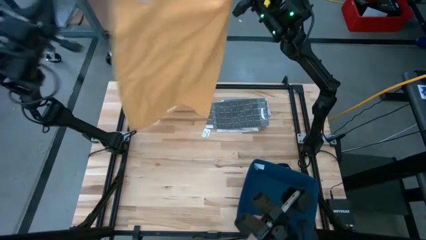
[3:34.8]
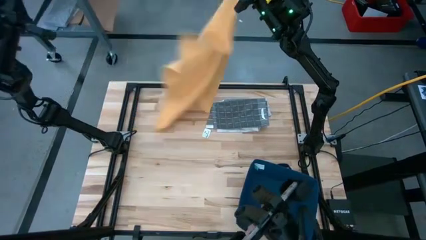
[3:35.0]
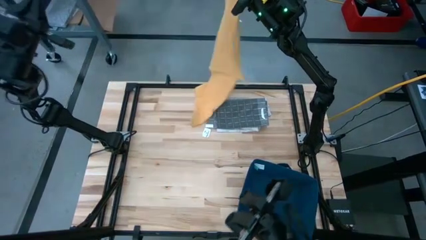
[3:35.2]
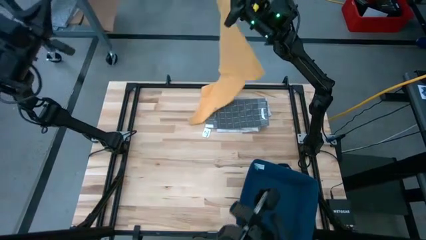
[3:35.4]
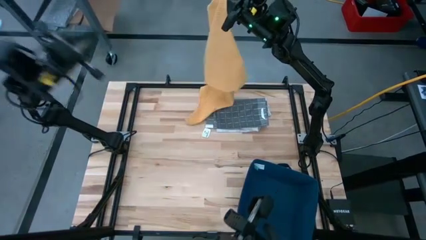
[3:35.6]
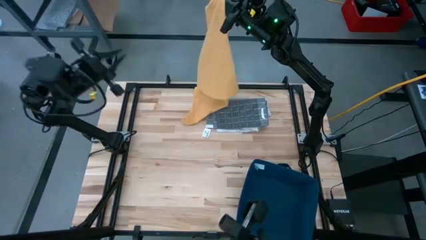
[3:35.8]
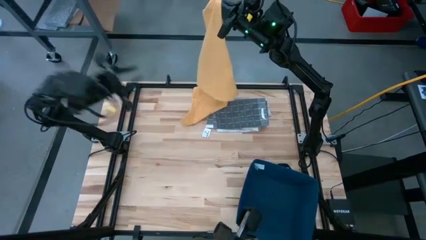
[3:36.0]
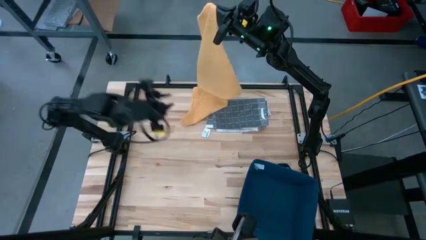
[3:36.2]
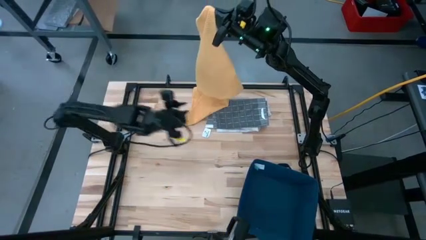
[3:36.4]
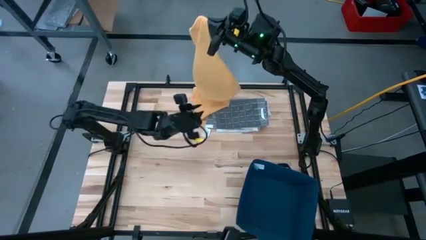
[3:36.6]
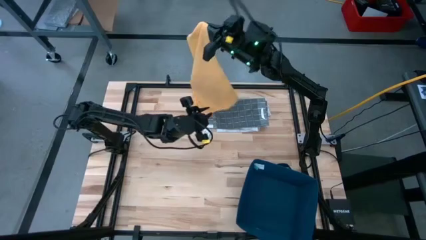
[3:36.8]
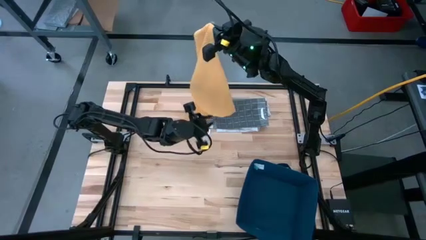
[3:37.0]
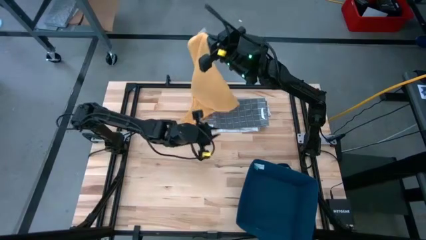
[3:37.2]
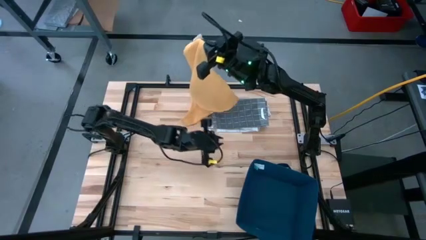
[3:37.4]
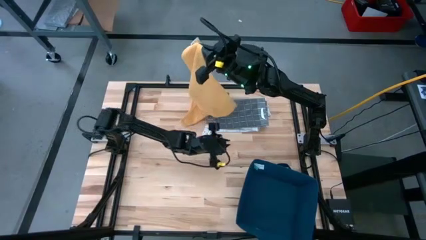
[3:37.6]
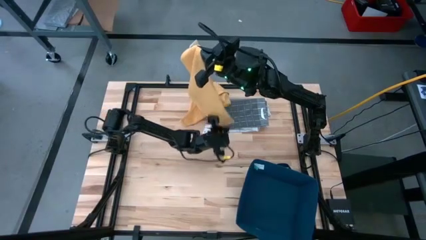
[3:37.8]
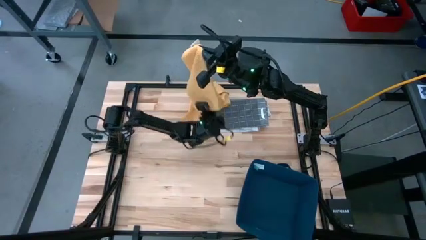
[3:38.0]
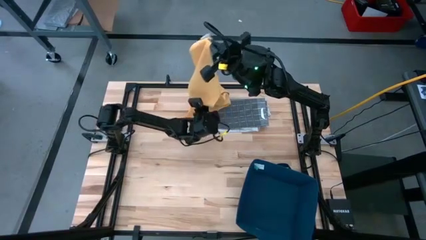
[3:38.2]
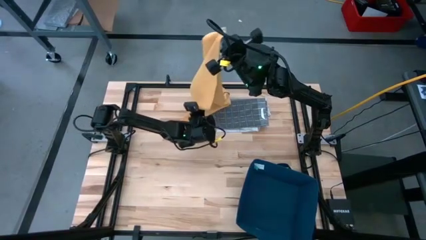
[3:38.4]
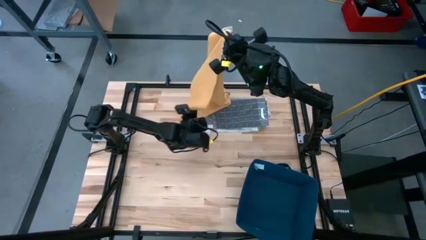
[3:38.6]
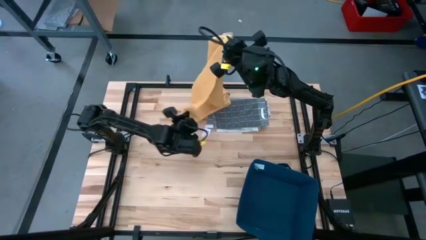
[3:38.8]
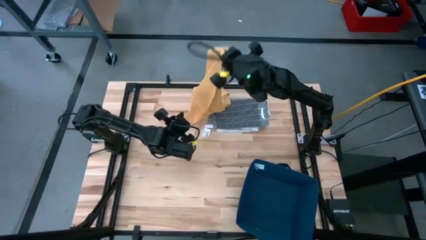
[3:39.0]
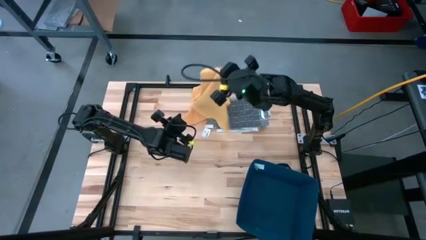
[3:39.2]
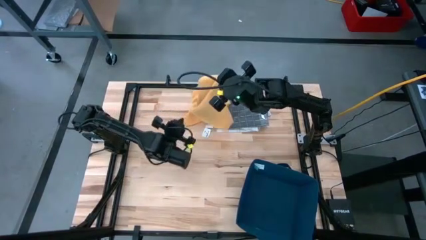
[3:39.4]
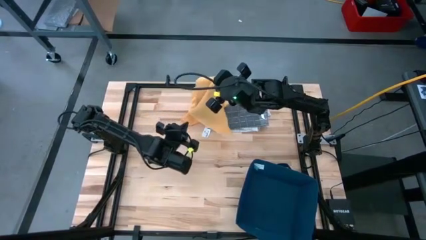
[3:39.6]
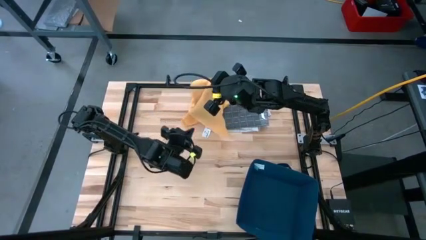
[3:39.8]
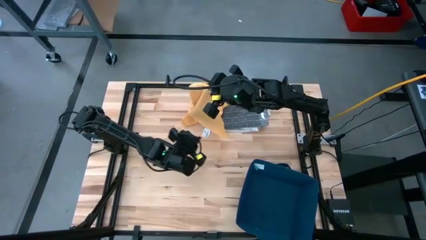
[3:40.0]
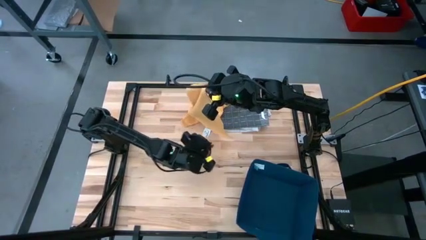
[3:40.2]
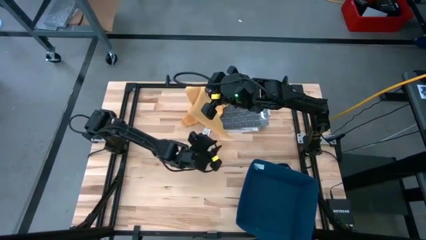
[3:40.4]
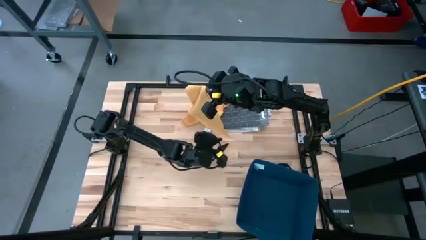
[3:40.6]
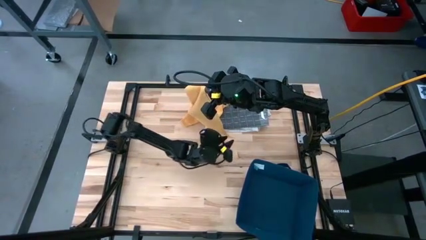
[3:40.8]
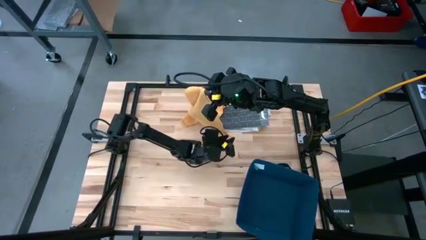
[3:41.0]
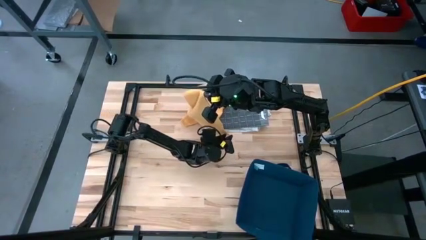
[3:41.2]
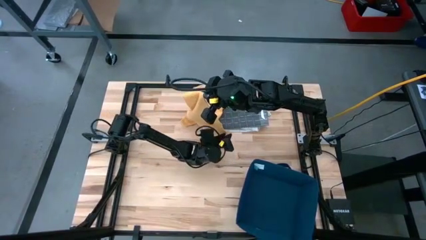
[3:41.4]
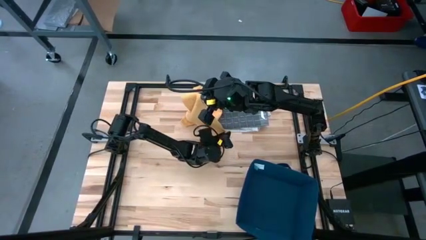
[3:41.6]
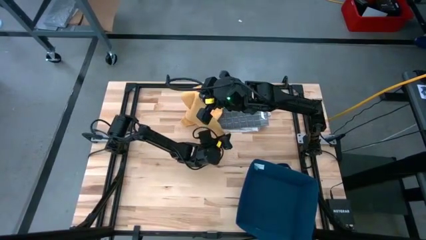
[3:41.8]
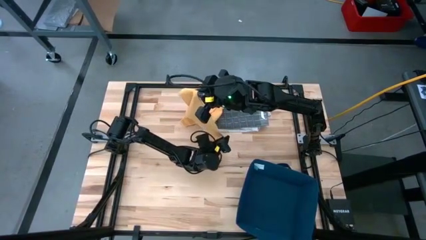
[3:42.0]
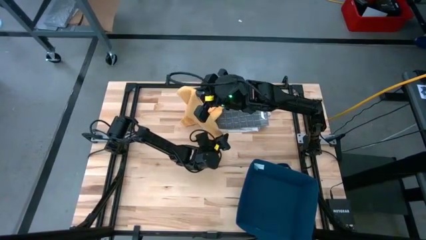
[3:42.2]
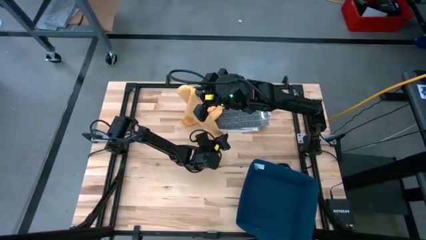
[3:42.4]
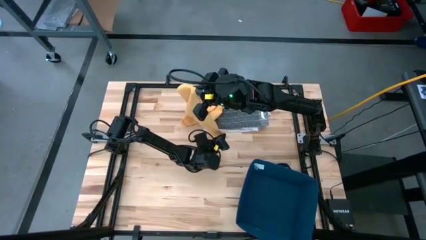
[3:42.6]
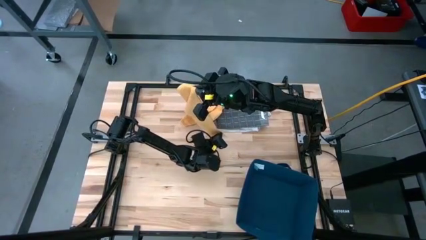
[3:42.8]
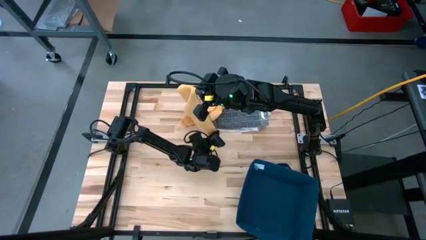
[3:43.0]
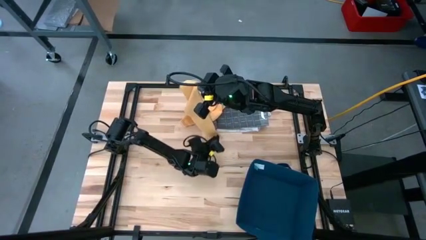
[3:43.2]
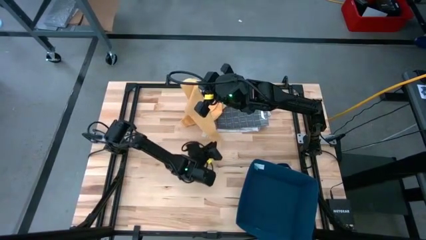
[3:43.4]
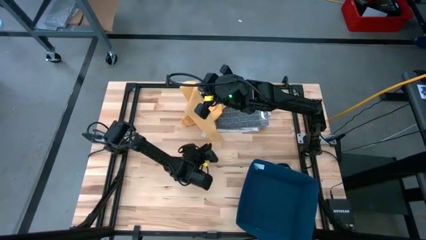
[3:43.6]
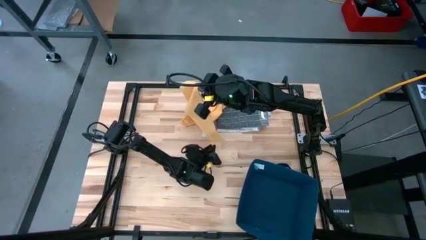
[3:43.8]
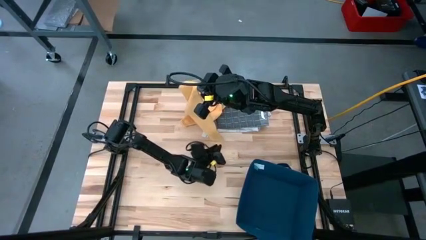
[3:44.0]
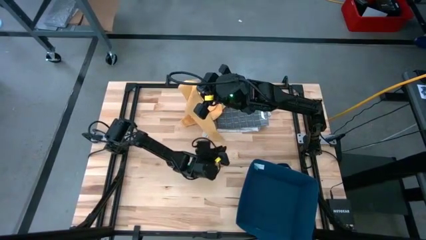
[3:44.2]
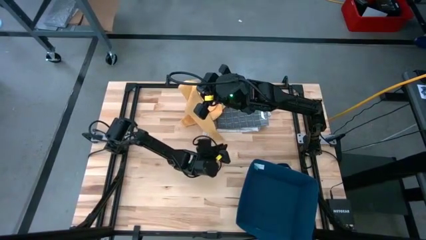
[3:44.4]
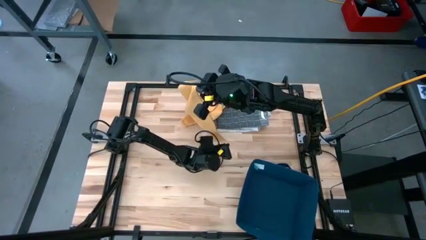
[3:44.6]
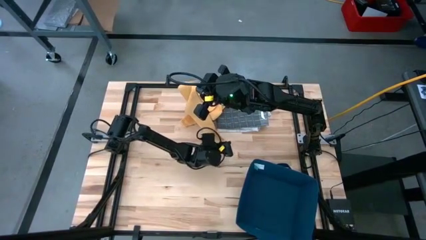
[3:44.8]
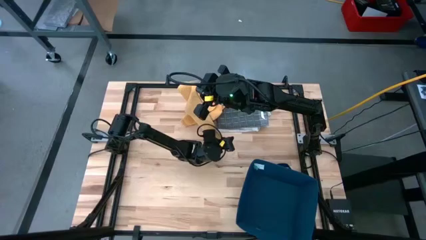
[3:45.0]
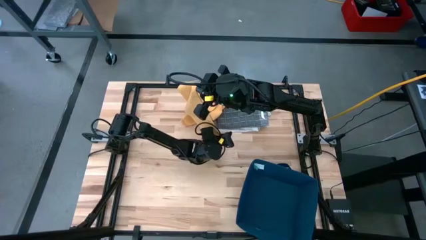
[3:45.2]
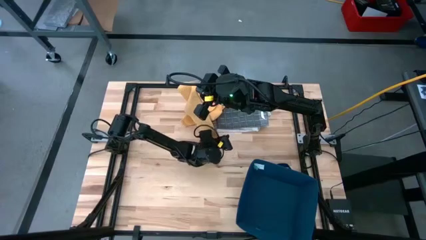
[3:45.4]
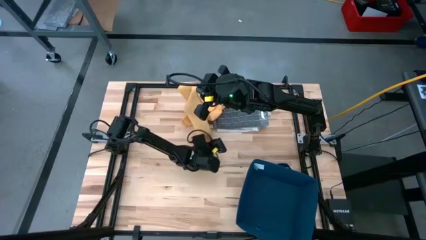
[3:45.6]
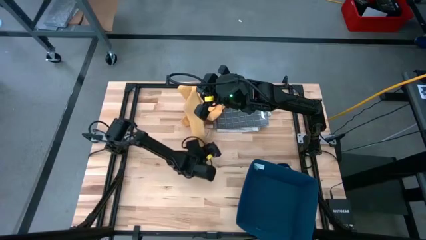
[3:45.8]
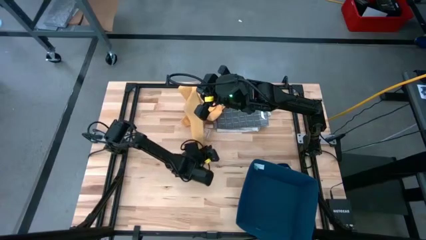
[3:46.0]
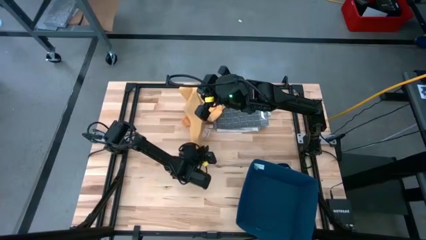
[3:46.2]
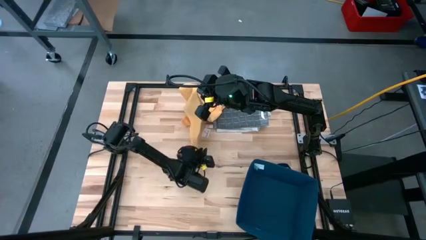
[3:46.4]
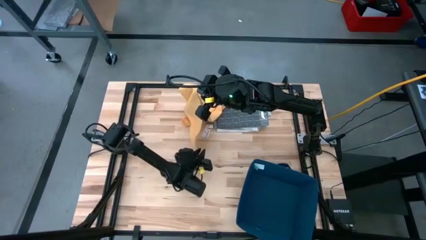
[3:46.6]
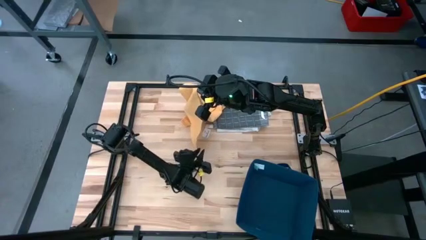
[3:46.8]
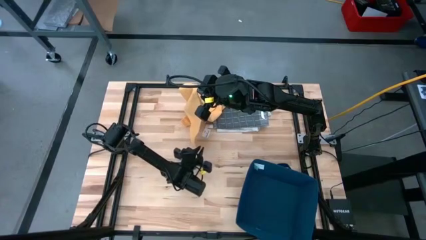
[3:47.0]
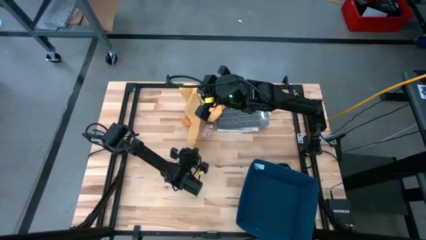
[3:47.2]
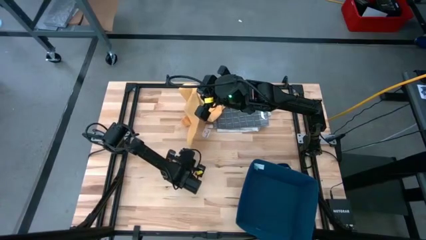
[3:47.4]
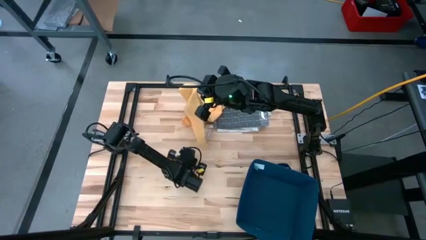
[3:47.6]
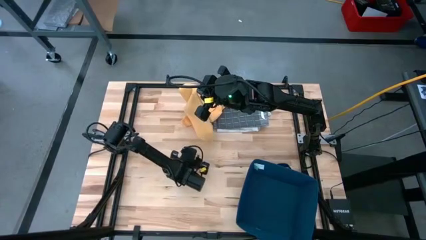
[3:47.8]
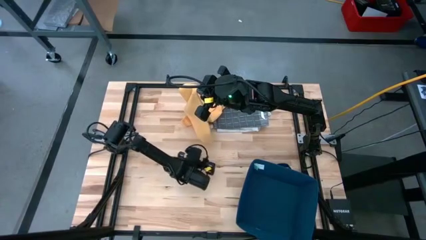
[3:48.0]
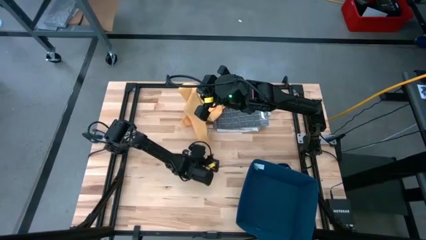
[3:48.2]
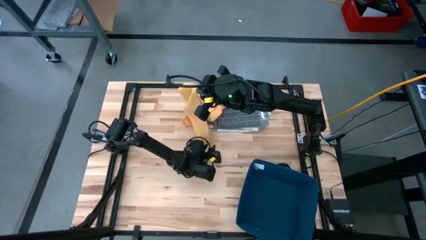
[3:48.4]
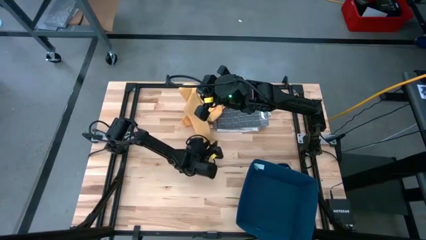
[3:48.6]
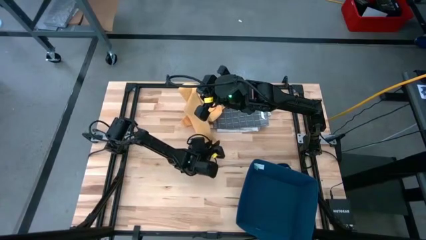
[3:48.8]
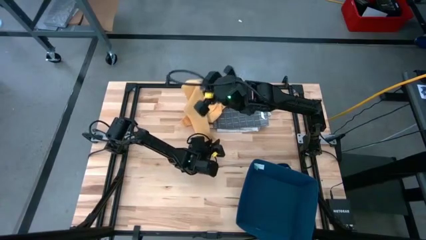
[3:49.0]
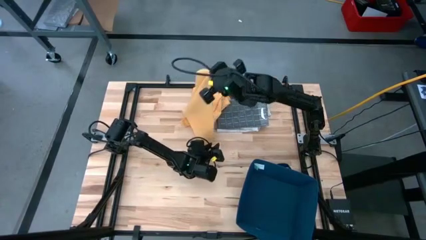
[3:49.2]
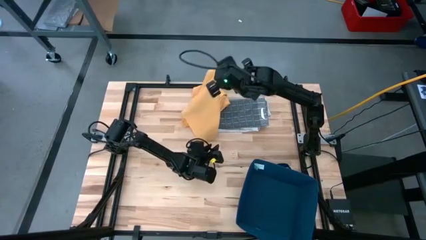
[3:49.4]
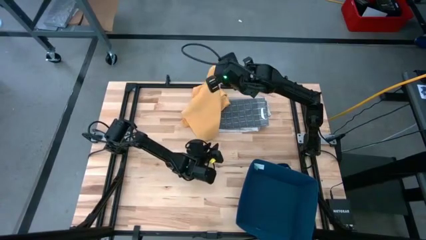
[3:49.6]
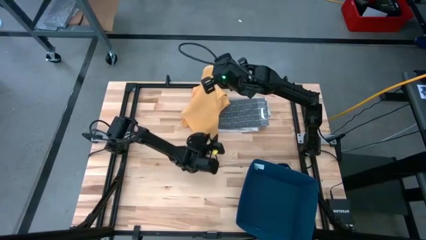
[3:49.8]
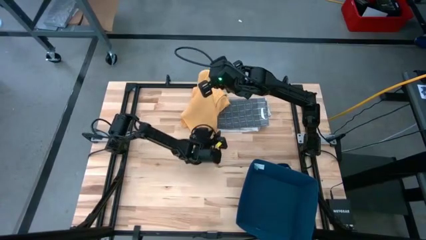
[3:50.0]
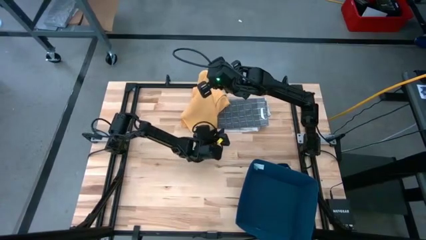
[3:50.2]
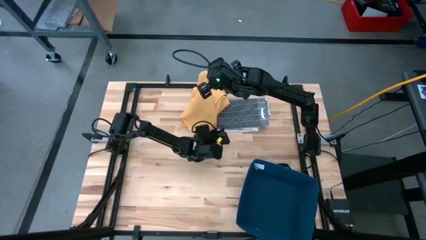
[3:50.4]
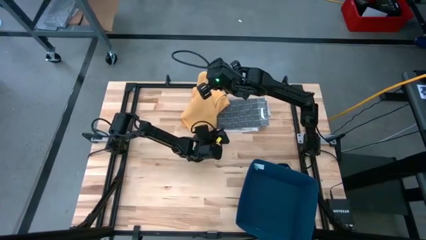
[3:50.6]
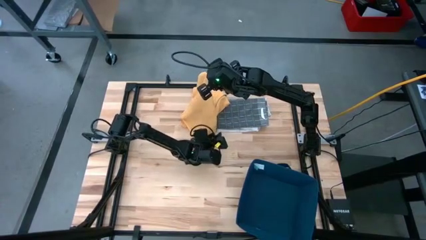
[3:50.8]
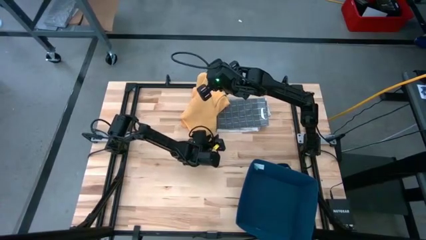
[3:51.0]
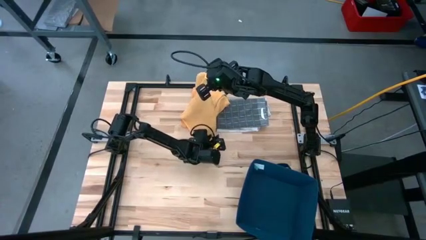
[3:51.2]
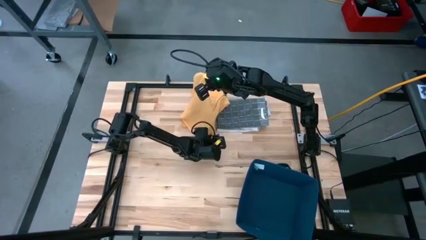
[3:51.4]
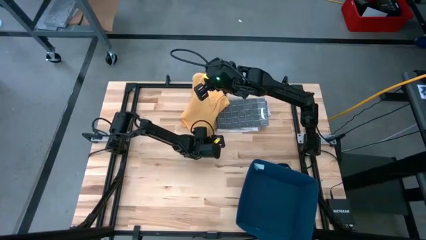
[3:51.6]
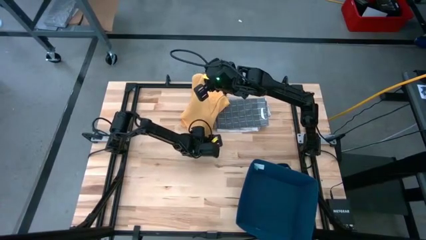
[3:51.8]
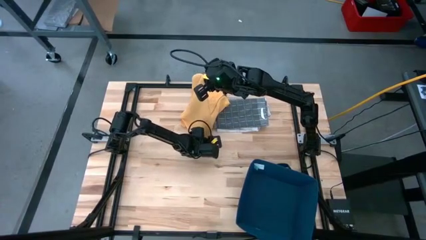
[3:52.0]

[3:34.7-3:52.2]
Task: Fold towel
Fold the yellow kitchen towel
